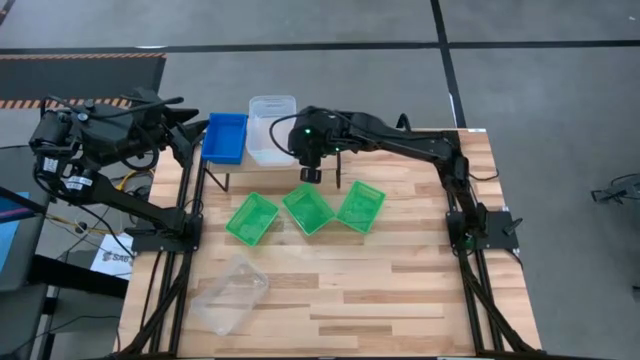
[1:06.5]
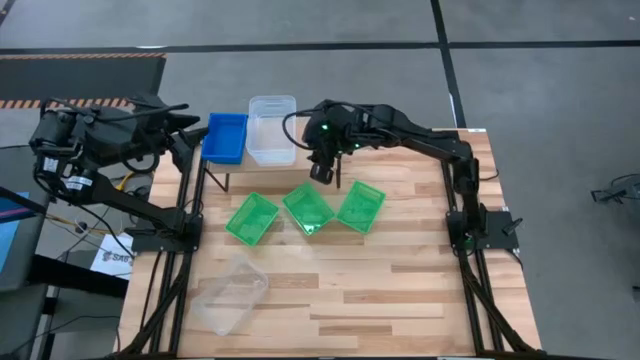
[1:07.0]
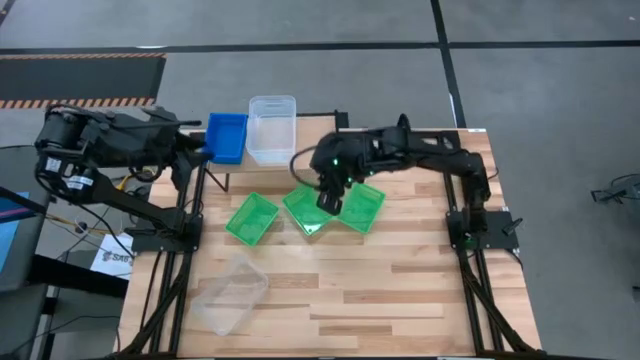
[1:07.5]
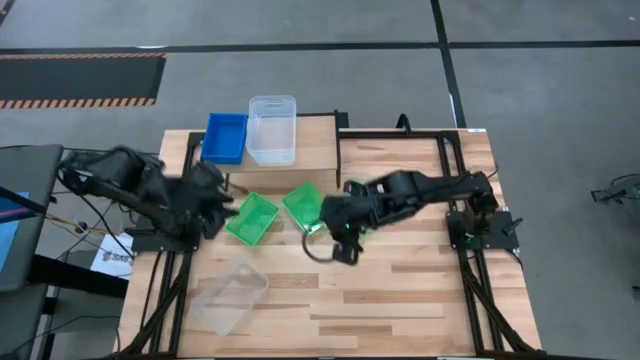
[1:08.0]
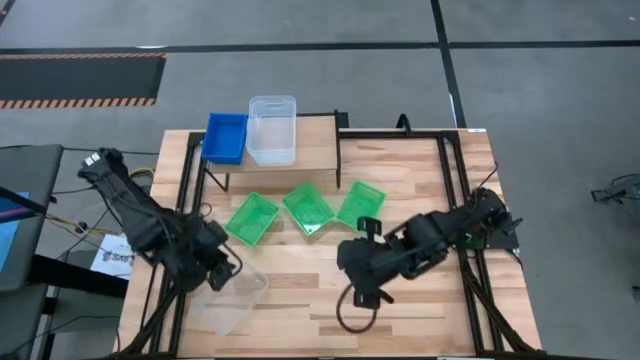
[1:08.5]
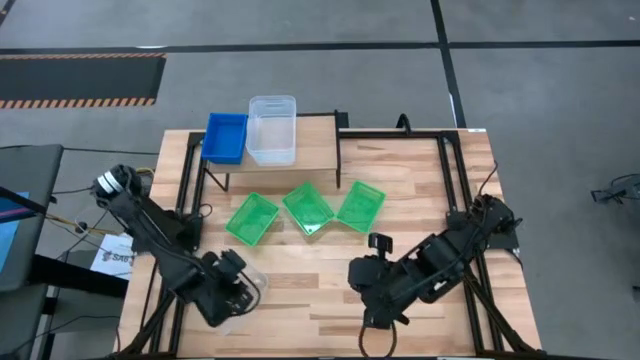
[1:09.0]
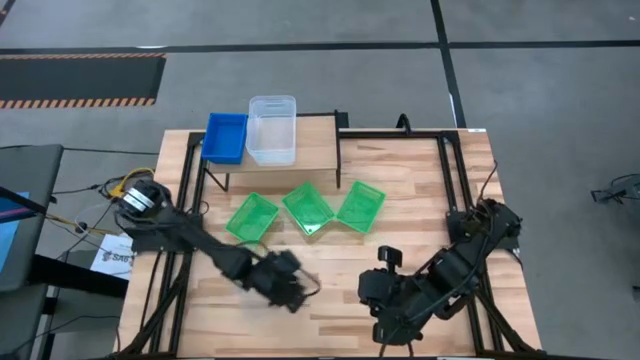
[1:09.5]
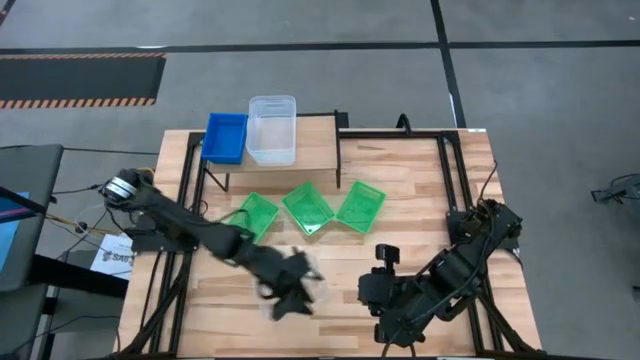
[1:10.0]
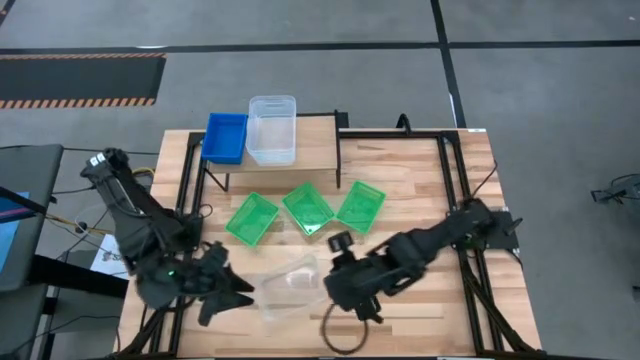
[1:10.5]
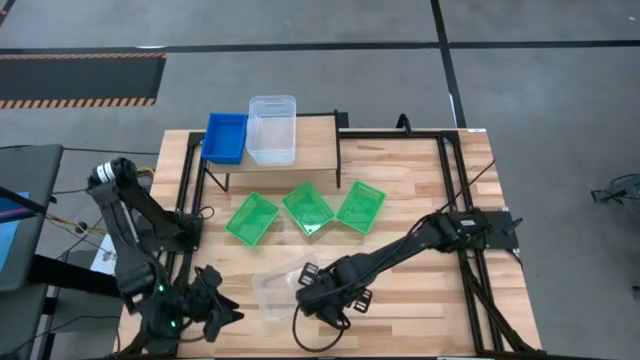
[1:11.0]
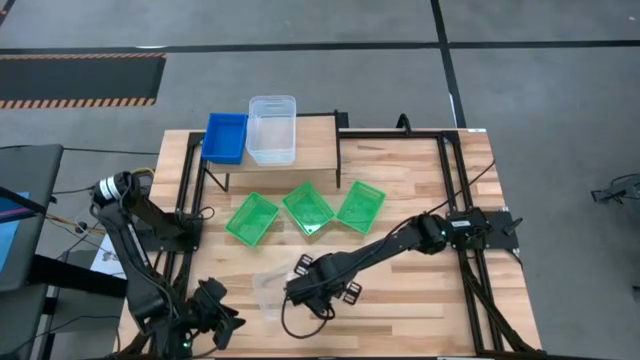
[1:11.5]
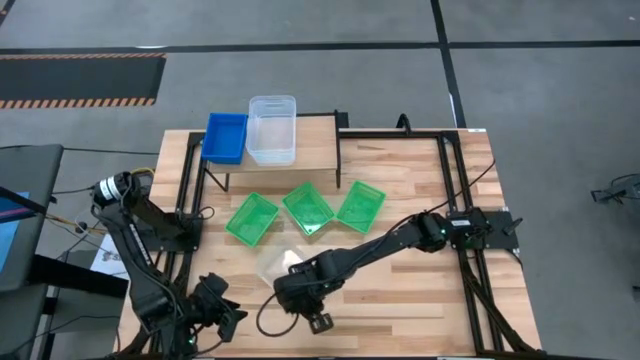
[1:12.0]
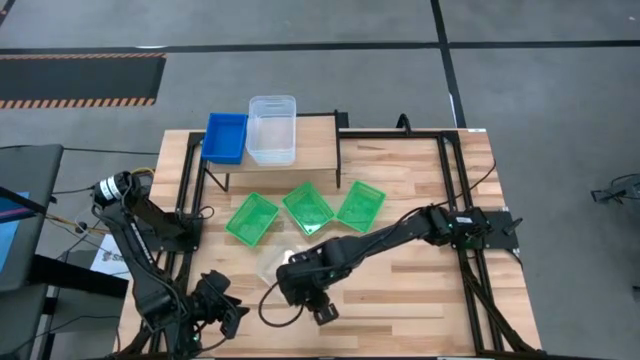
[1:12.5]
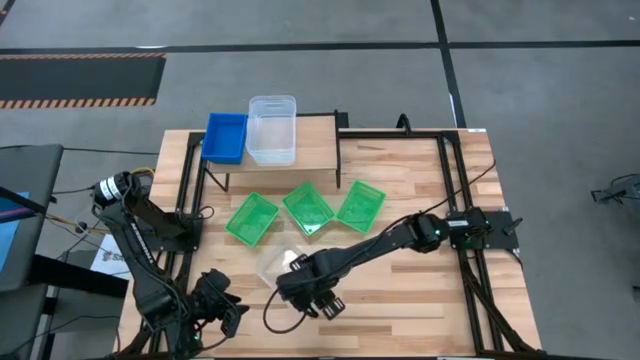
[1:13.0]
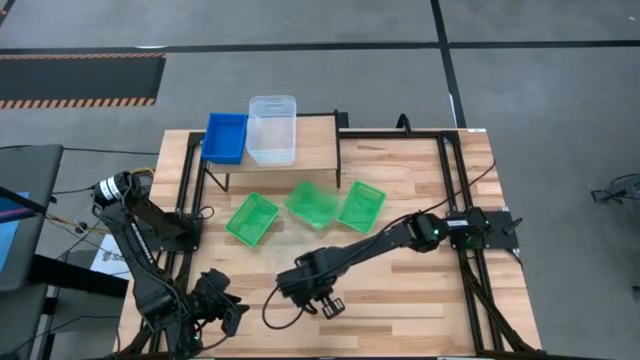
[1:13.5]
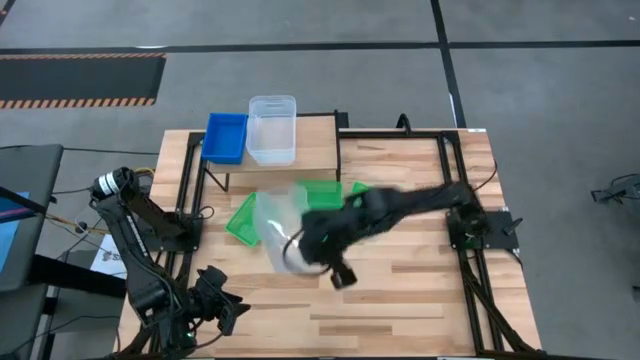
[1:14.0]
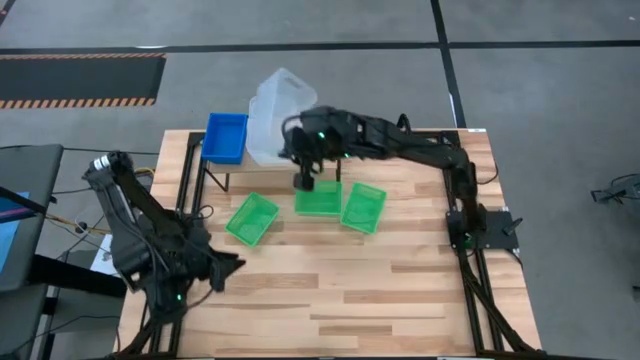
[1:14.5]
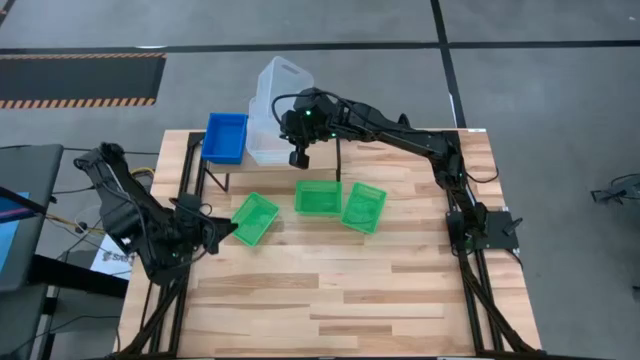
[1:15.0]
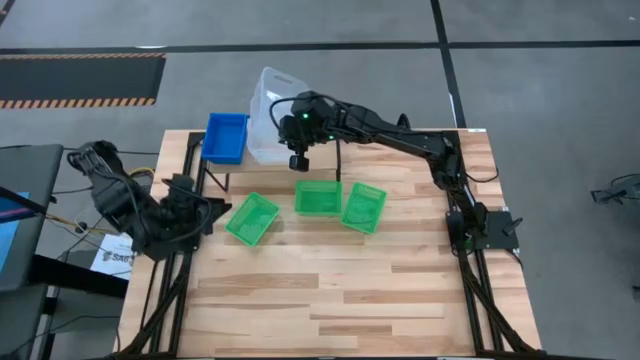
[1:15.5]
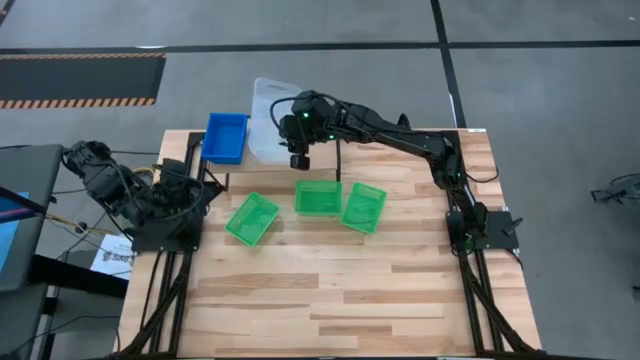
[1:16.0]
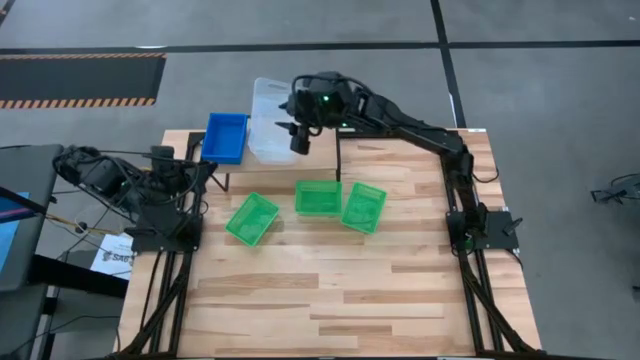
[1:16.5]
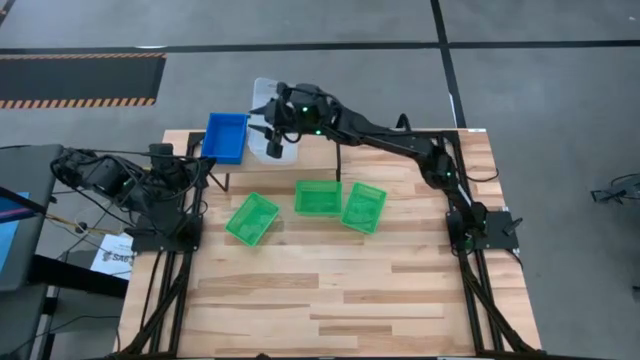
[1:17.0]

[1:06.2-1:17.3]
Task: Stack baskets on shelf by color
Stack the transparent bin on top of the other transparent bins on the shelf

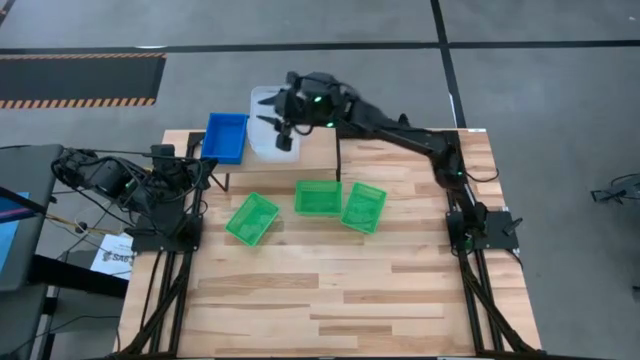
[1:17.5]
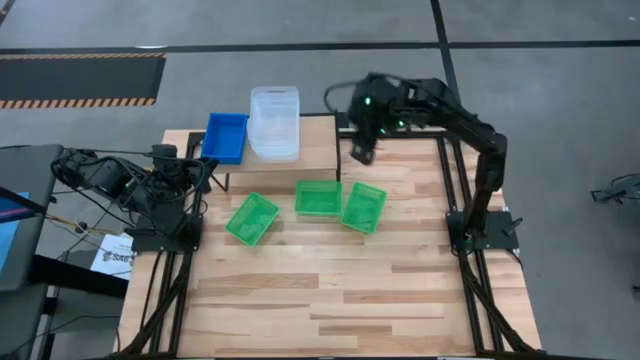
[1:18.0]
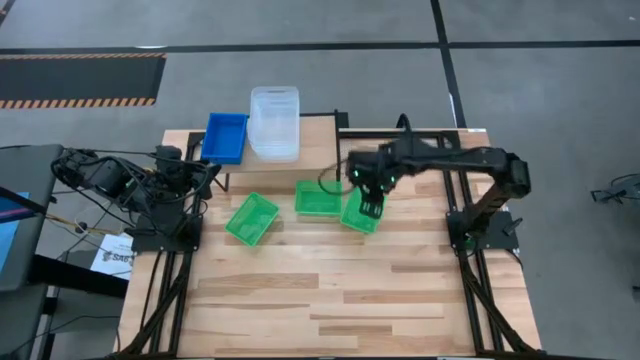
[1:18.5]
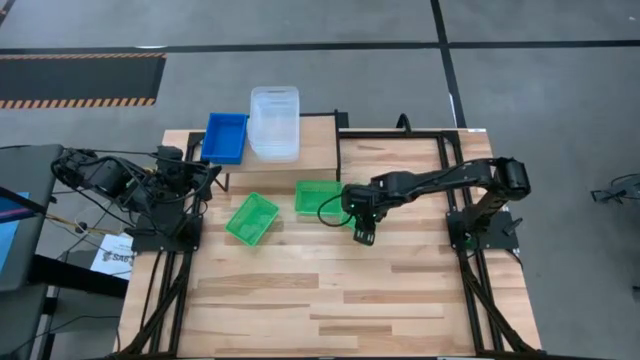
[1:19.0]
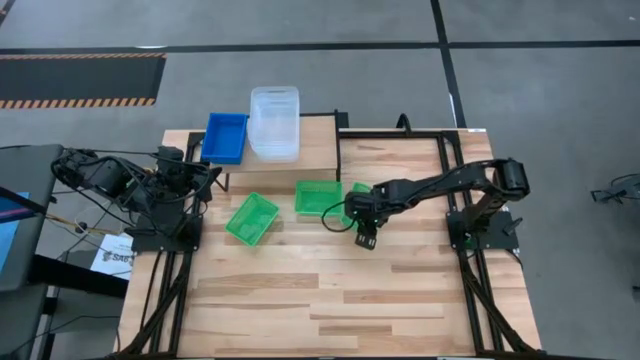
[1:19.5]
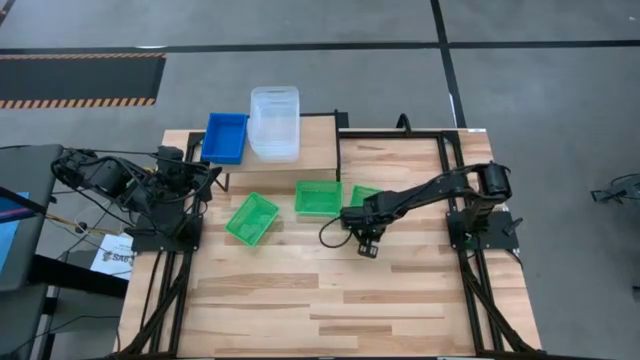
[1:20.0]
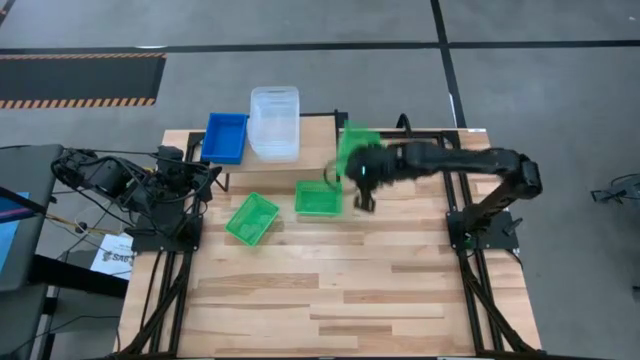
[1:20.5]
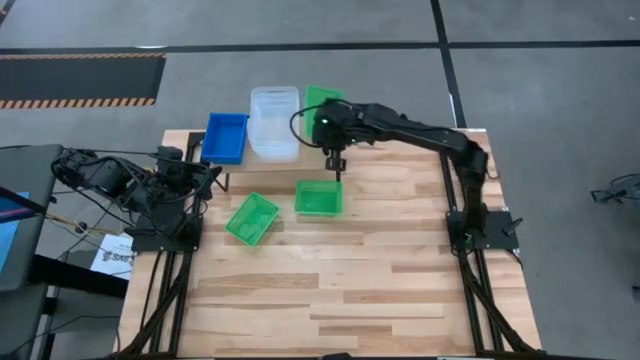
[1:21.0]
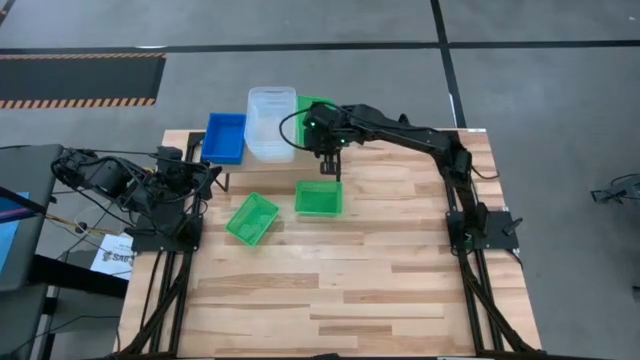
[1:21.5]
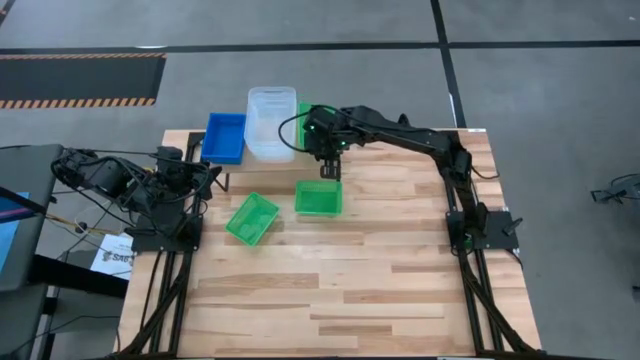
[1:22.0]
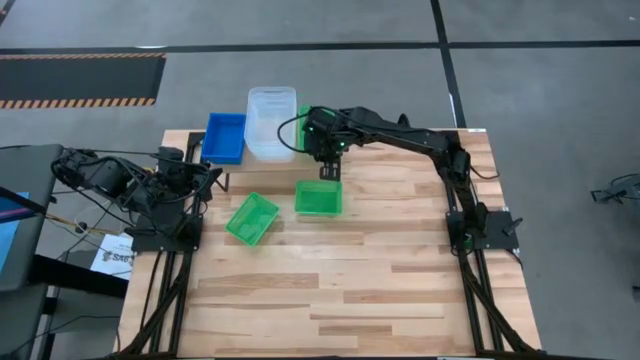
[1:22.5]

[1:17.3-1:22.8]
Put the right green bin on the shelf

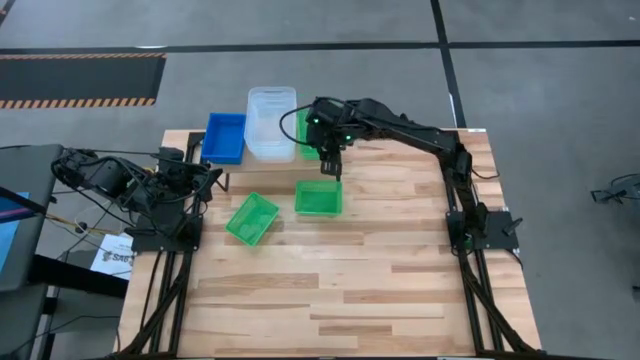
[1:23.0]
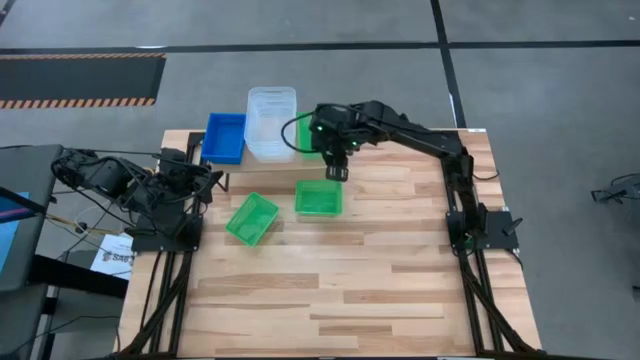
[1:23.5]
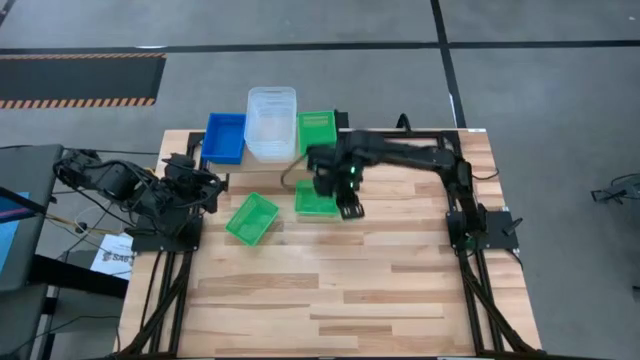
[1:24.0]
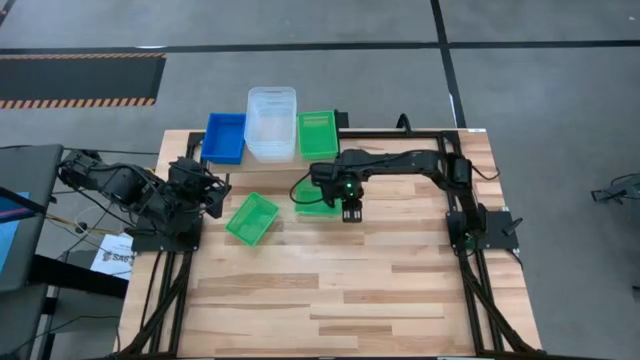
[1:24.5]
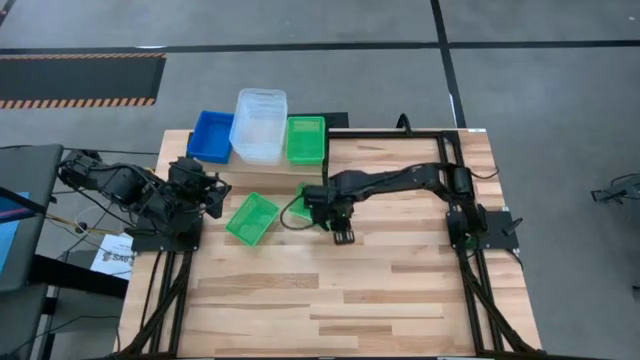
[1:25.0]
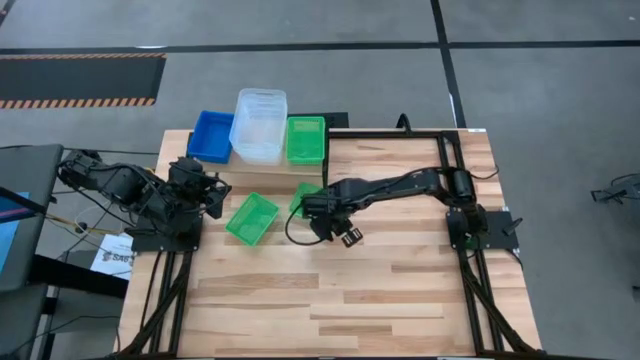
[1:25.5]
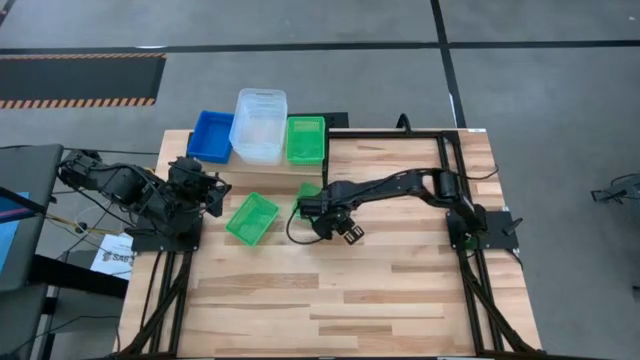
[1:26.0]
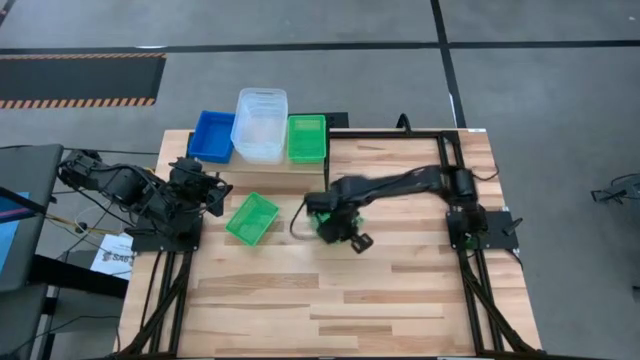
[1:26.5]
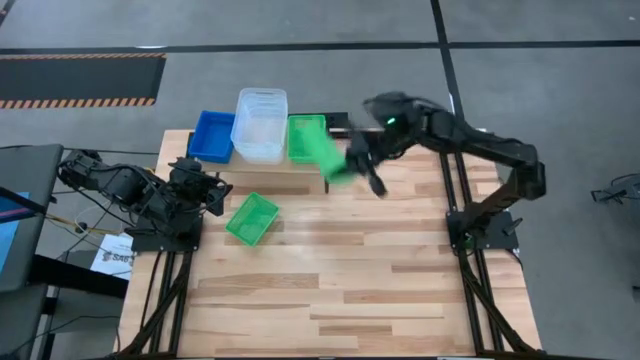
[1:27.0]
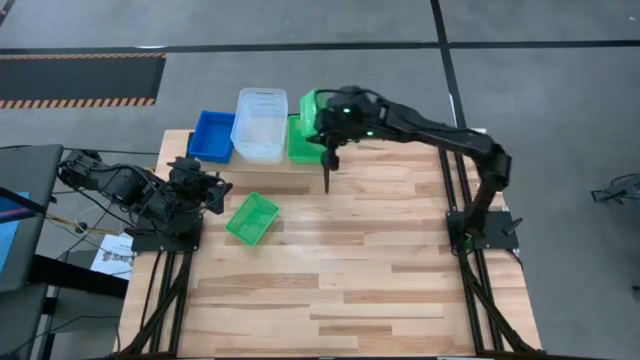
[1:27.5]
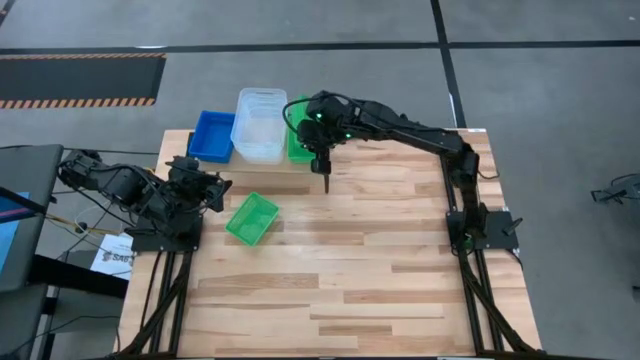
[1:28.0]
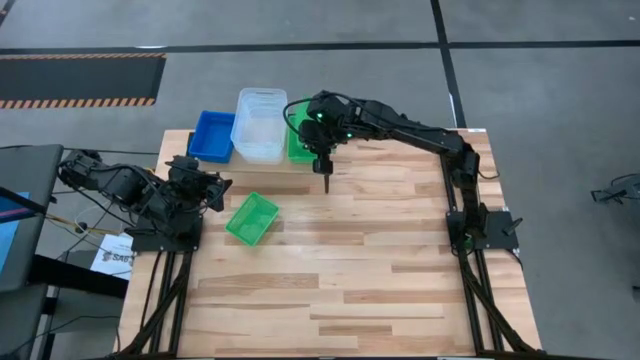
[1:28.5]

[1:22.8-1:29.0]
Stack the right green bin on top of the other green bin on the shelf
